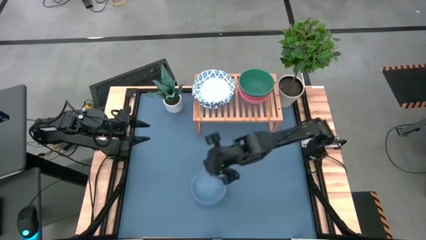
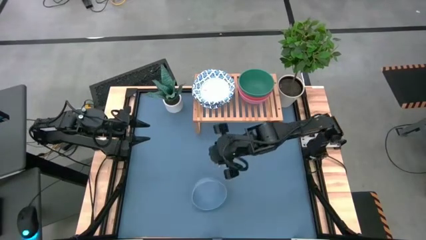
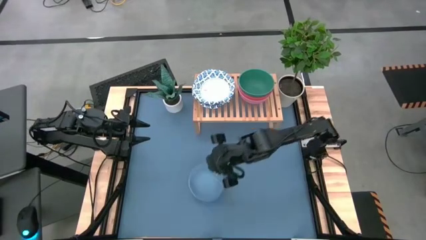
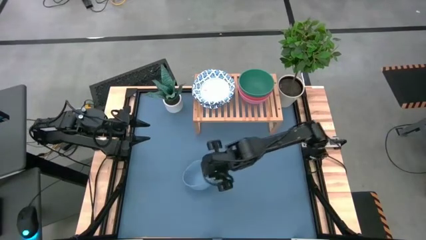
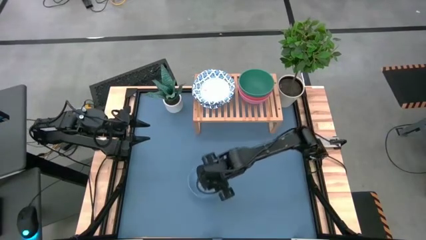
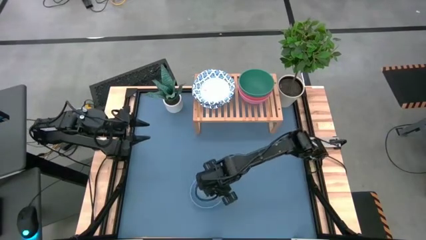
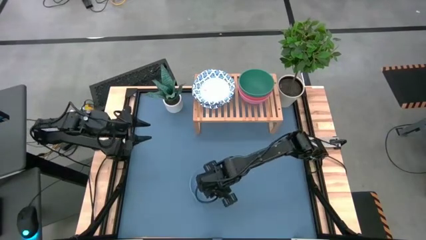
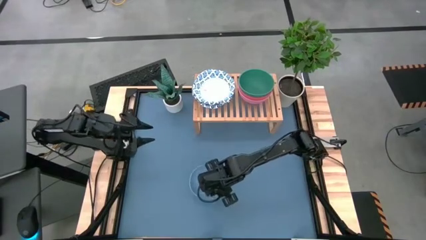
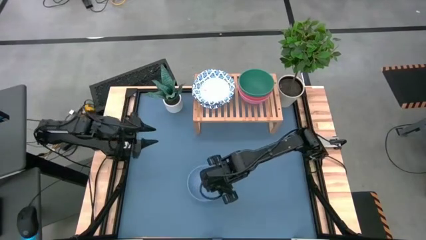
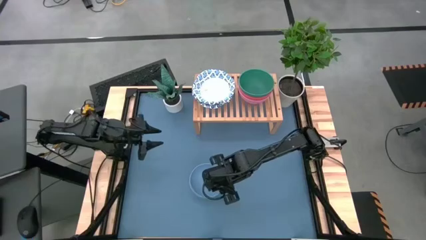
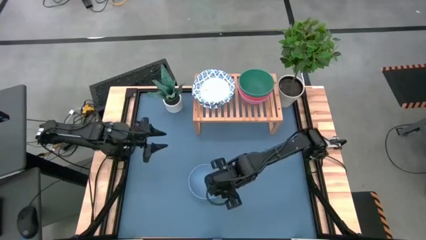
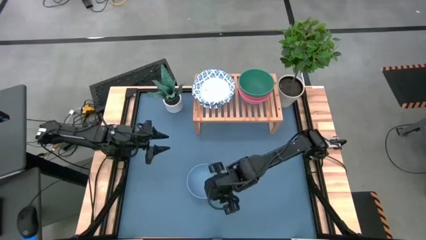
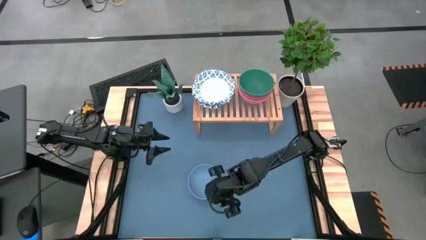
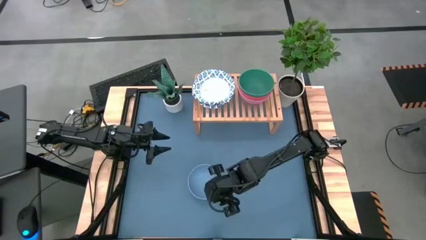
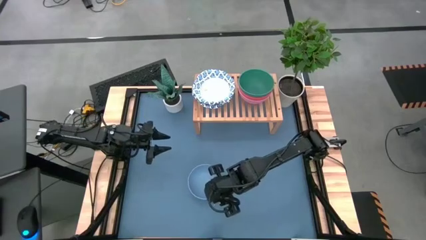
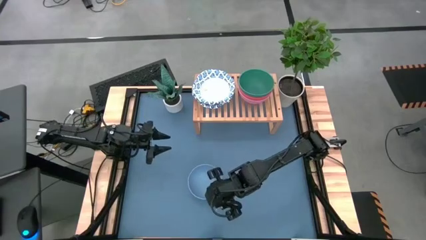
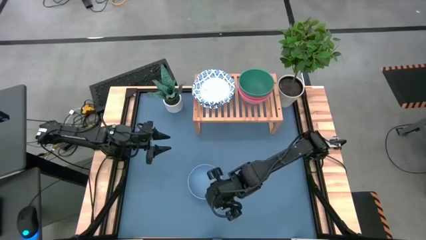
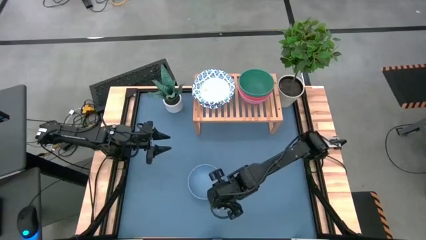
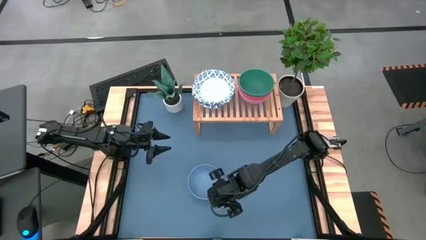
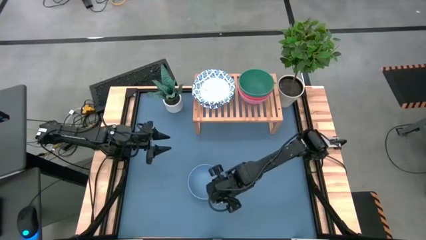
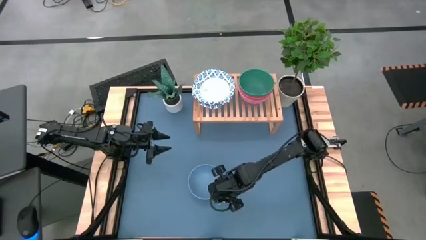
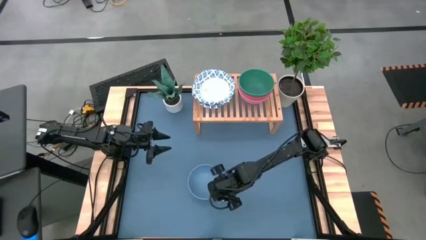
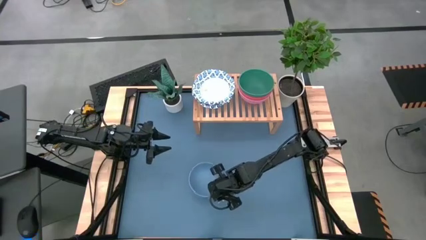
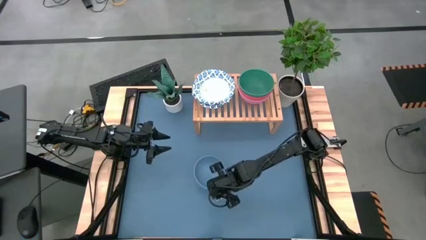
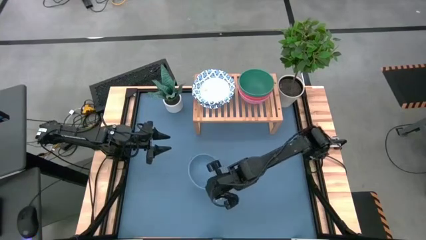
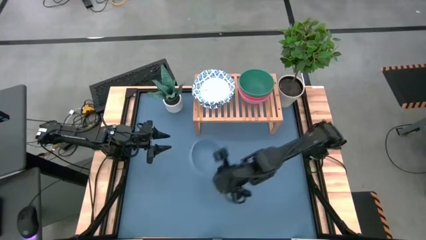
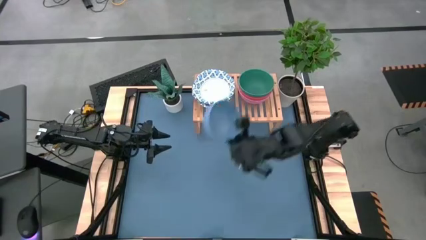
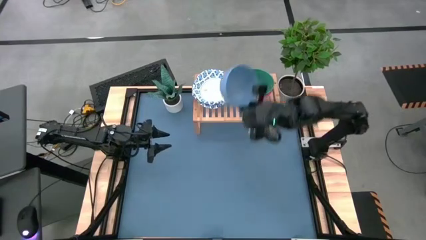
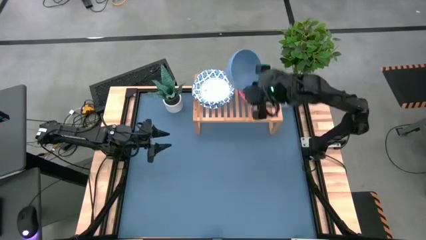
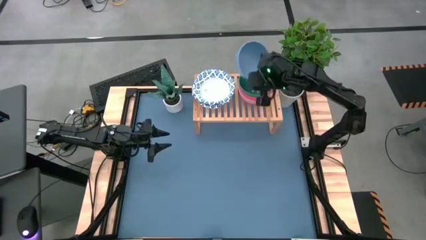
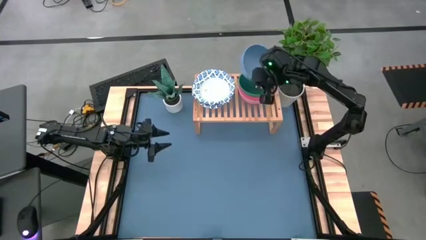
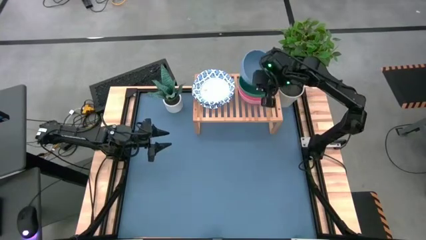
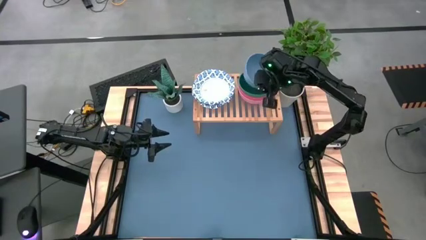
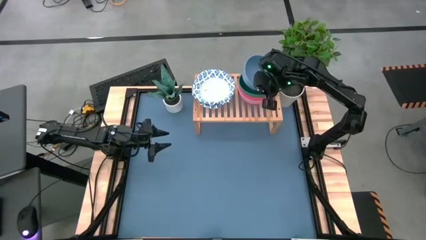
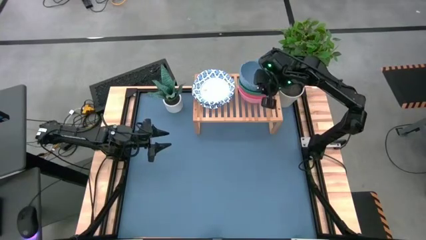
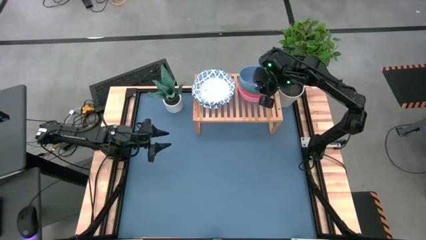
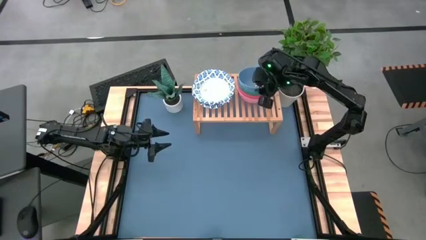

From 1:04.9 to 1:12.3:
Task: Place and stack bowls onto a shelf
Stack the blue bowl on top of the green bowl on the shelf

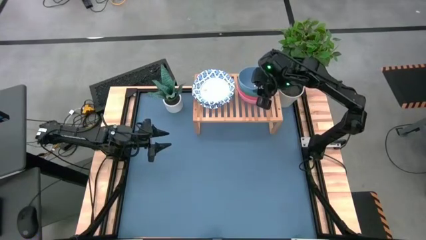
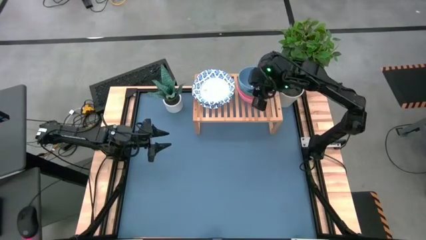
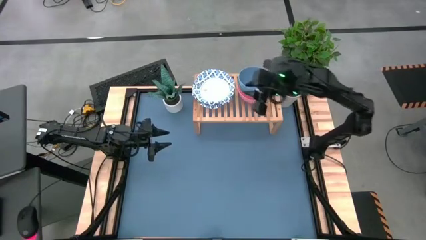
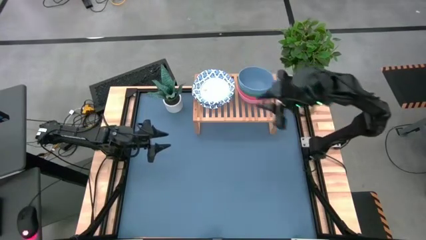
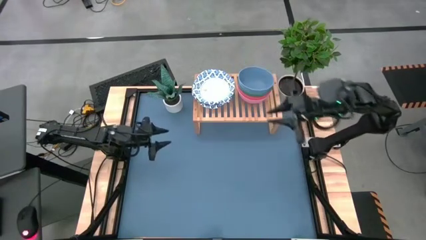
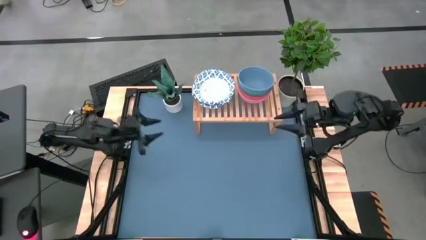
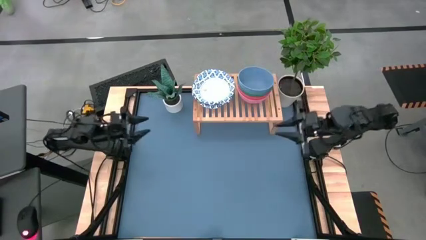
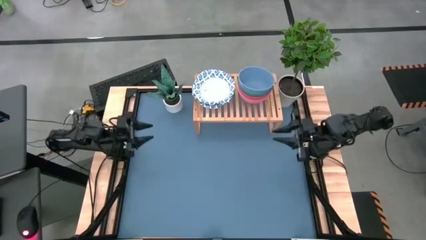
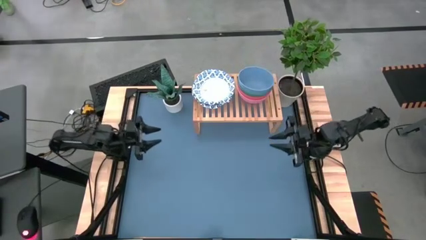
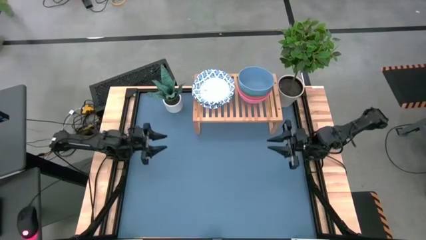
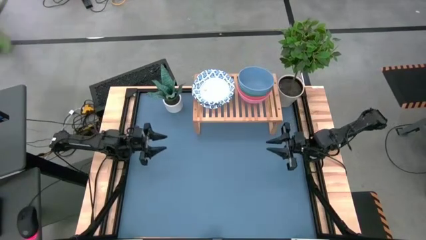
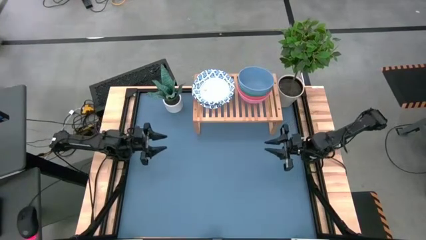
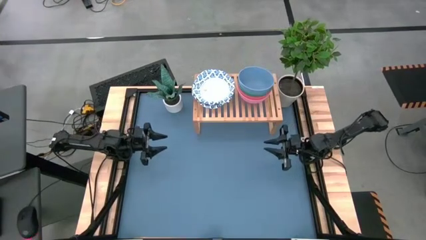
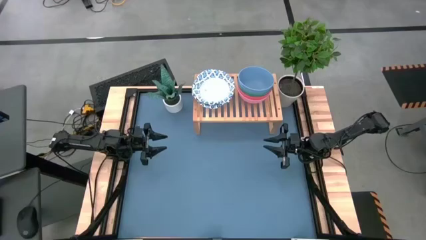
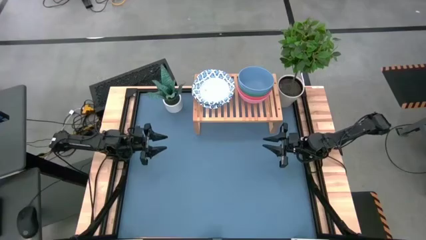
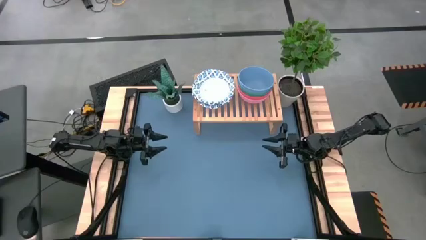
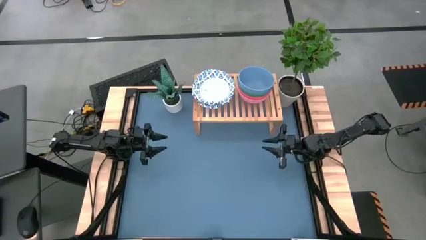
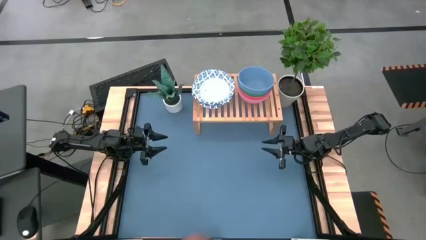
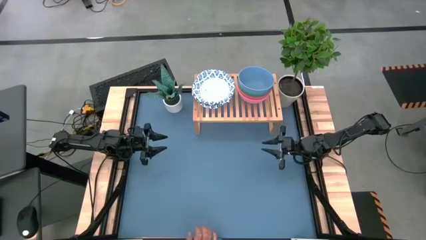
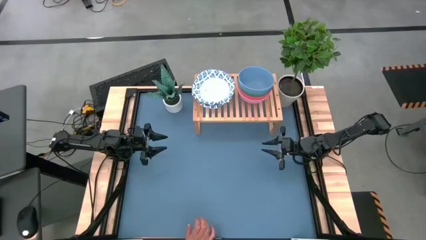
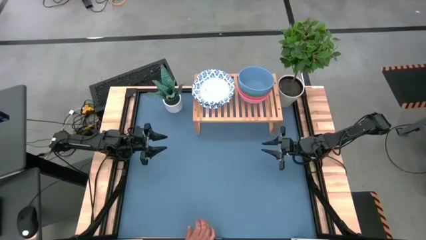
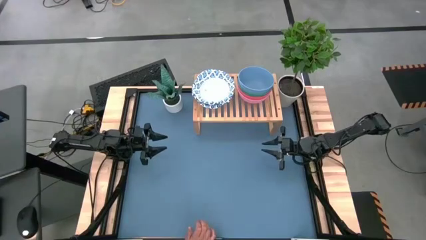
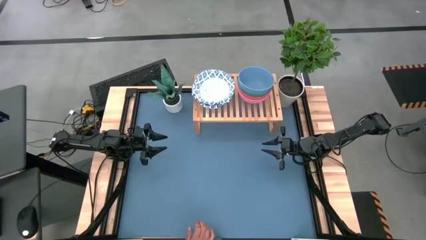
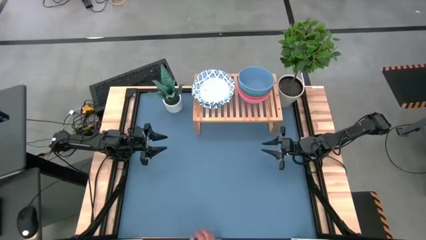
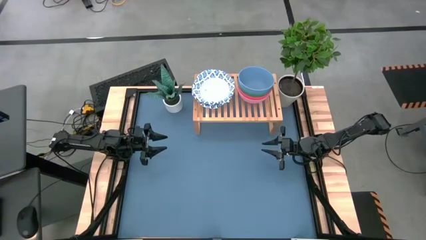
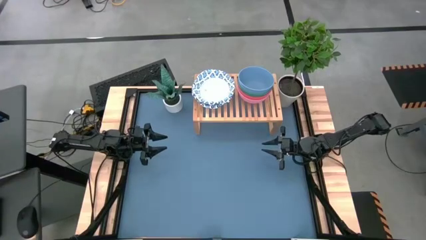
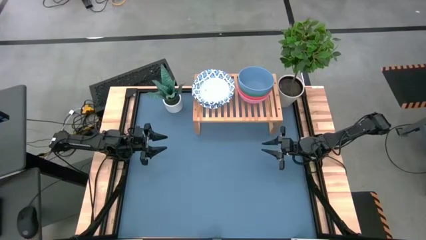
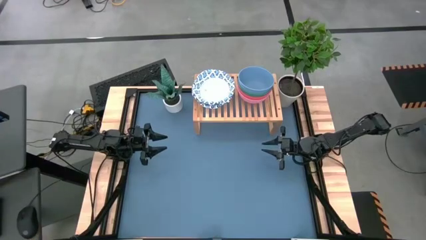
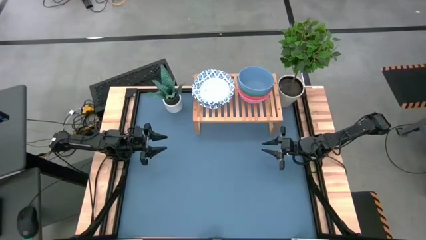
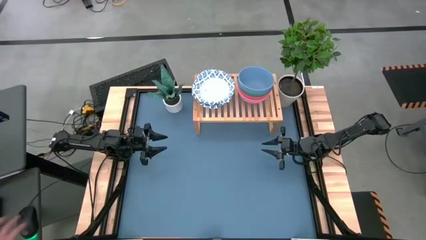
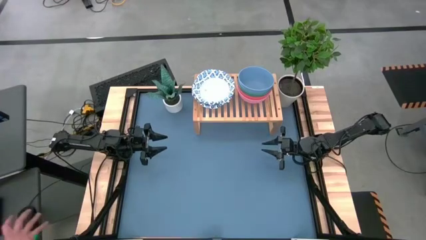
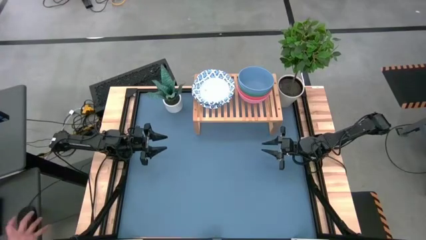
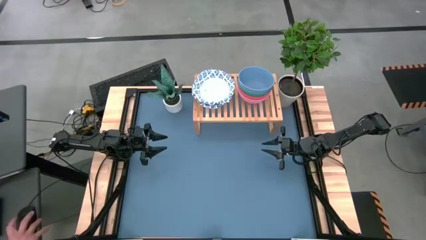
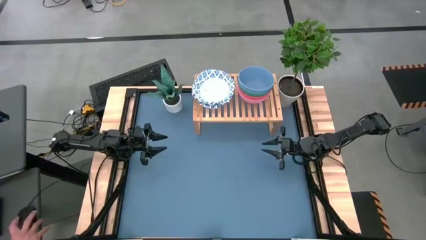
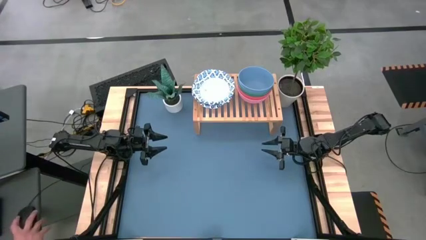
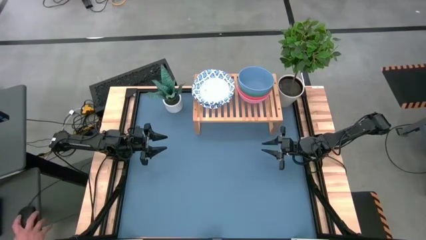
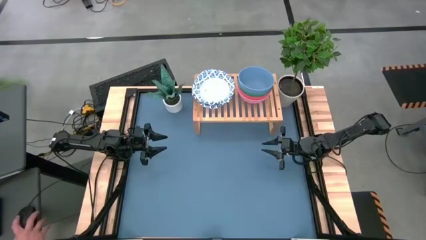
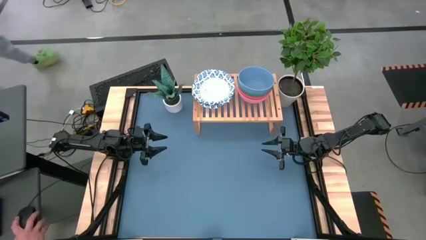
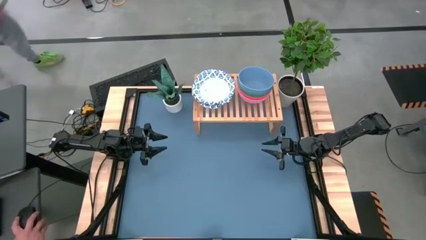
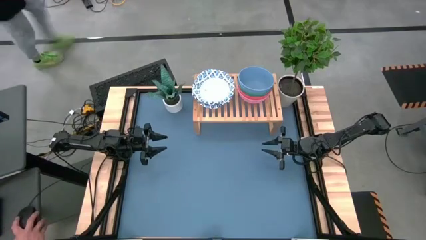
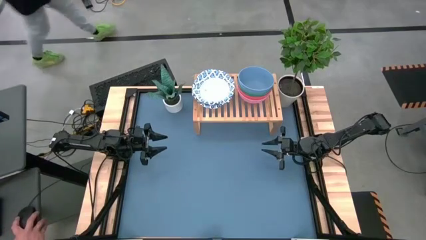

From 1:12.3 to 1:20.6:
Return to Home Position
